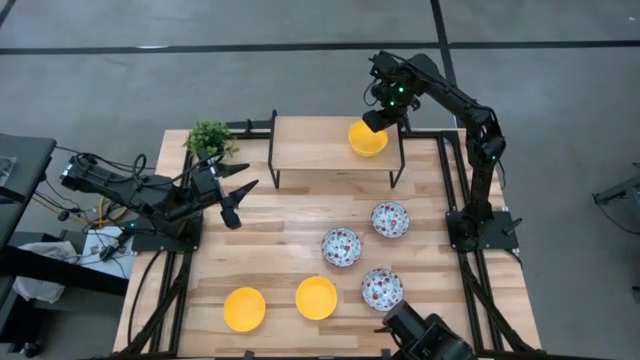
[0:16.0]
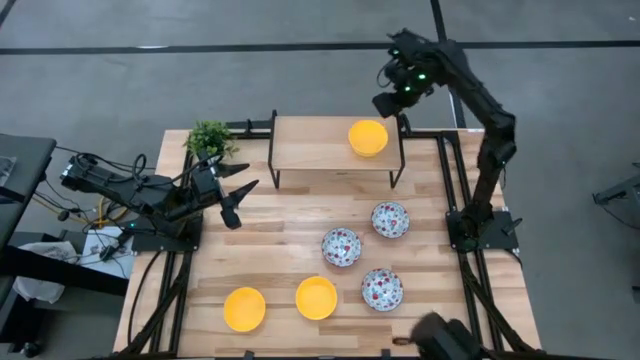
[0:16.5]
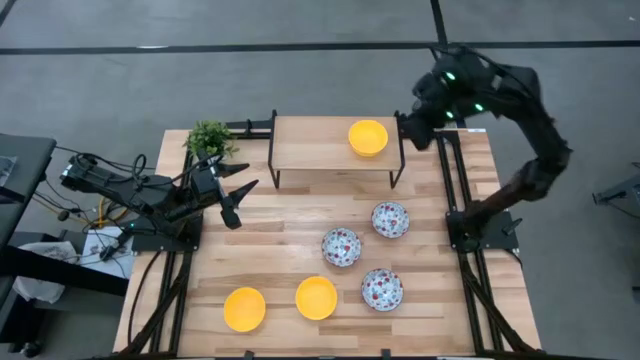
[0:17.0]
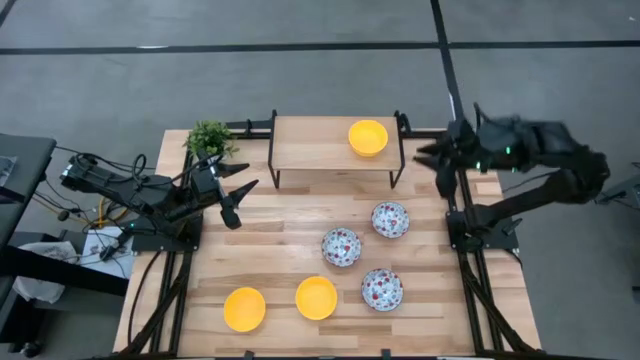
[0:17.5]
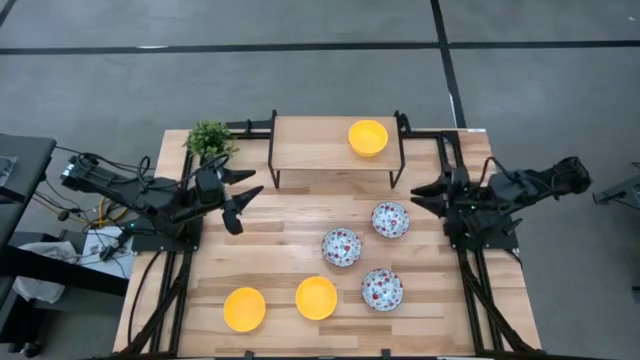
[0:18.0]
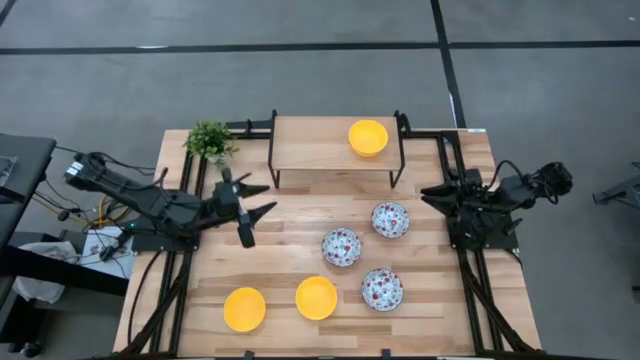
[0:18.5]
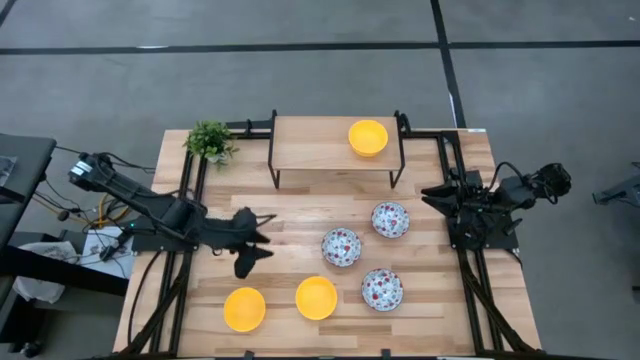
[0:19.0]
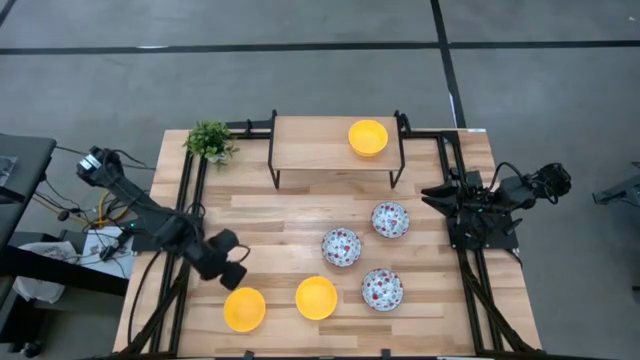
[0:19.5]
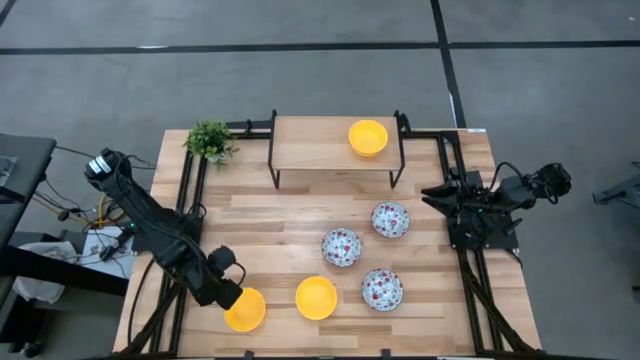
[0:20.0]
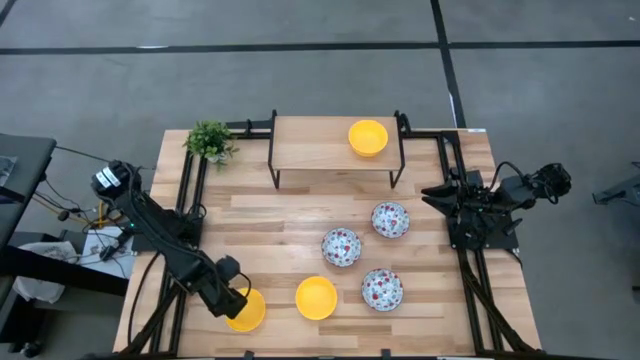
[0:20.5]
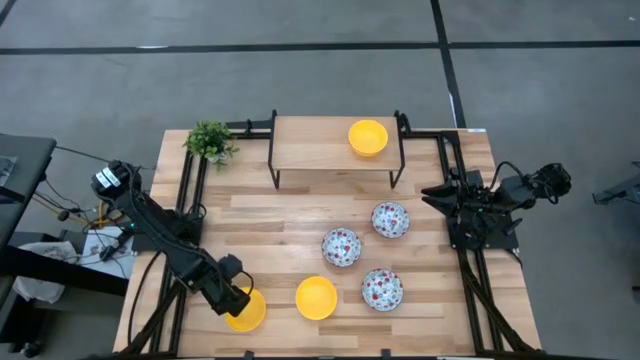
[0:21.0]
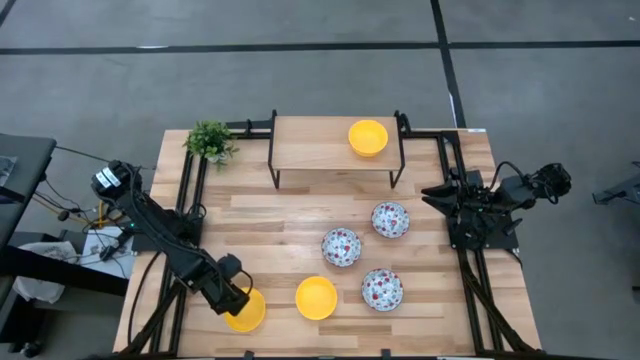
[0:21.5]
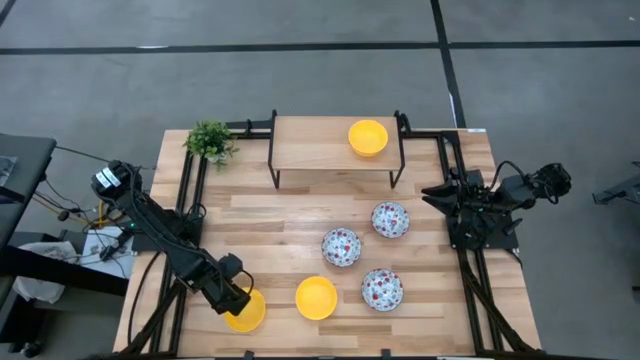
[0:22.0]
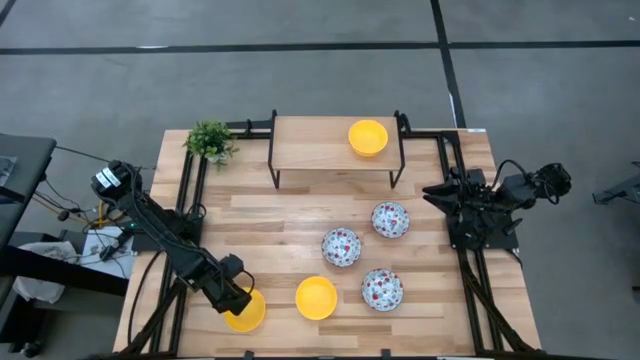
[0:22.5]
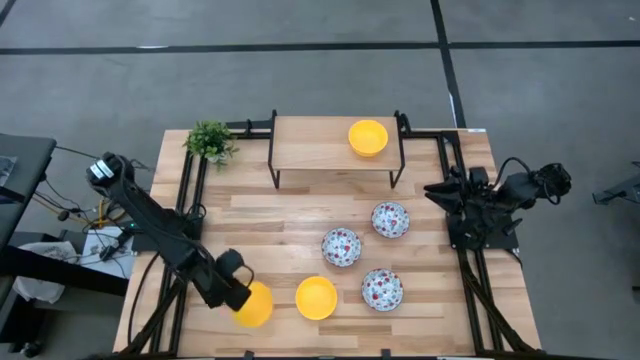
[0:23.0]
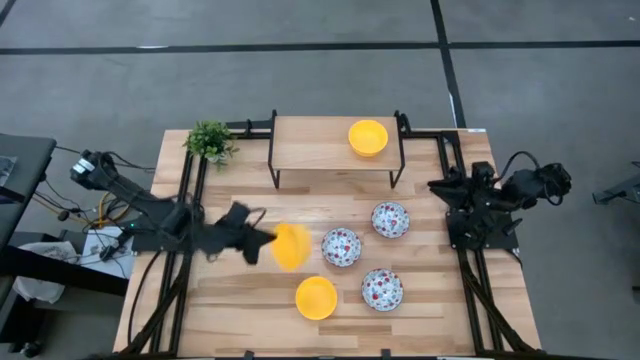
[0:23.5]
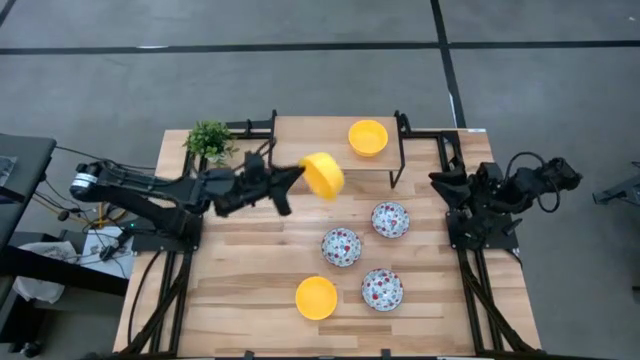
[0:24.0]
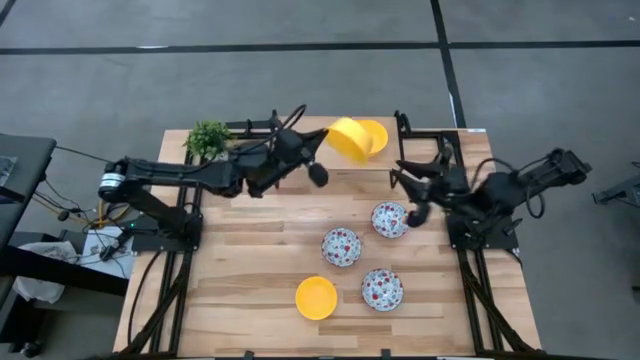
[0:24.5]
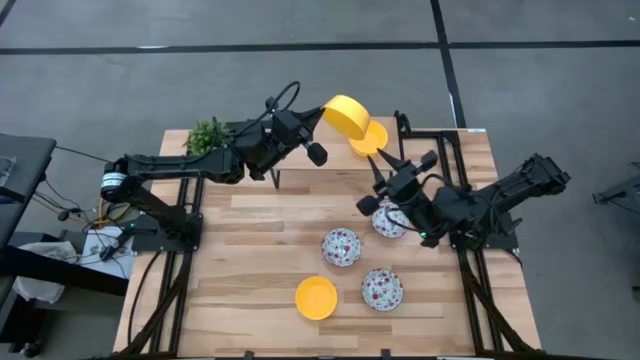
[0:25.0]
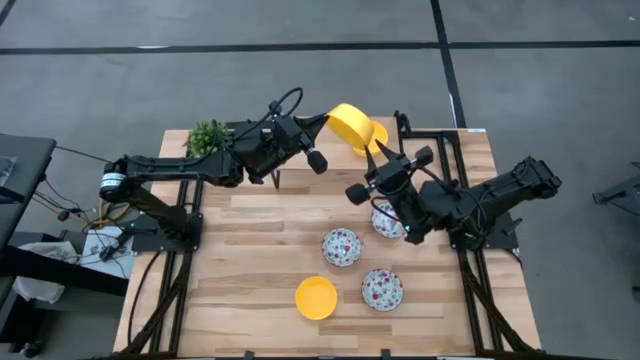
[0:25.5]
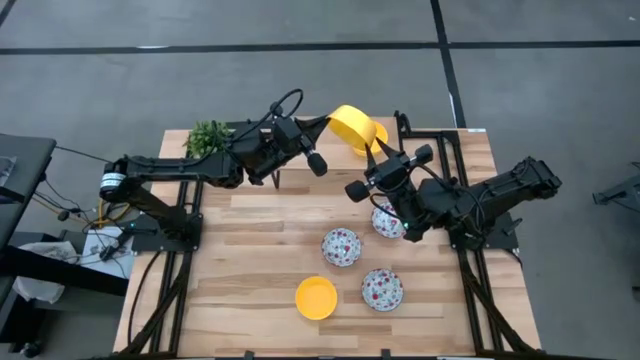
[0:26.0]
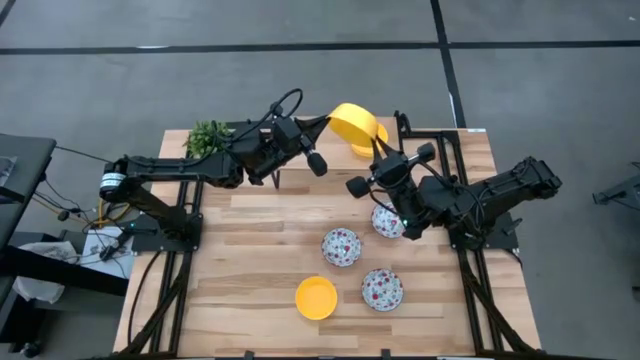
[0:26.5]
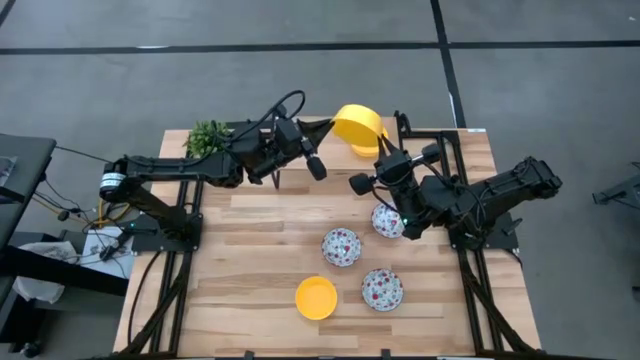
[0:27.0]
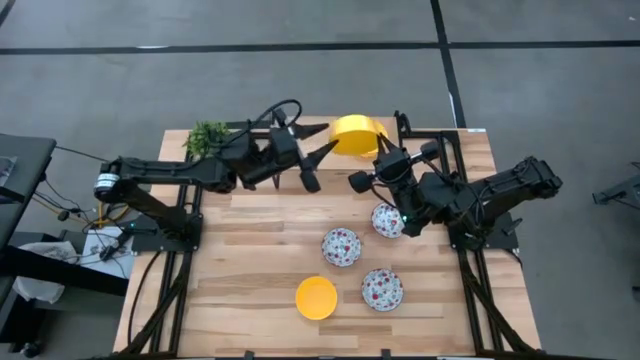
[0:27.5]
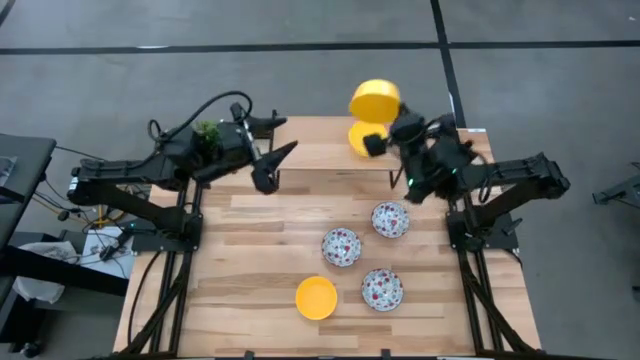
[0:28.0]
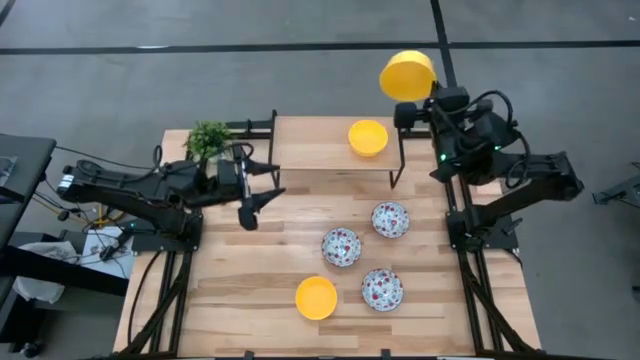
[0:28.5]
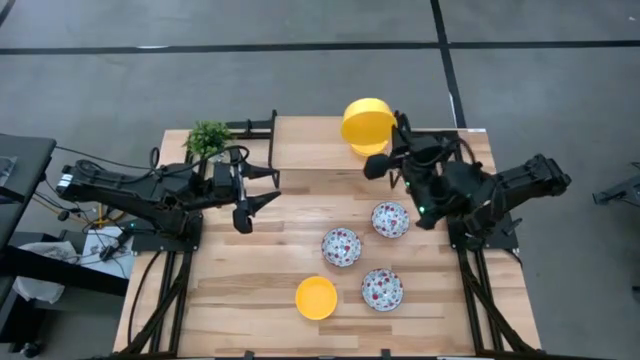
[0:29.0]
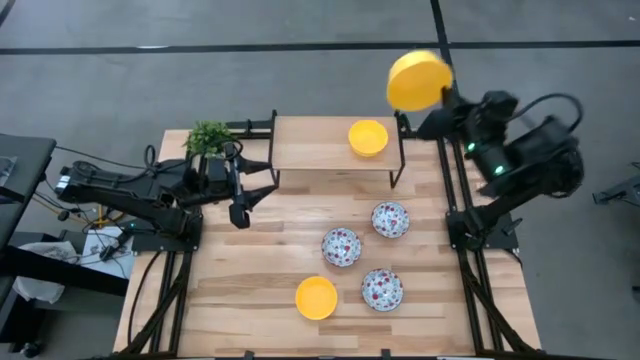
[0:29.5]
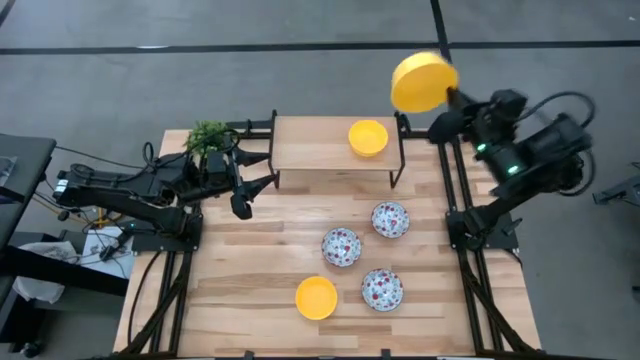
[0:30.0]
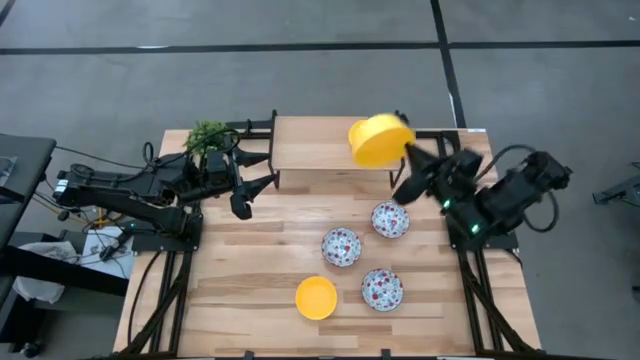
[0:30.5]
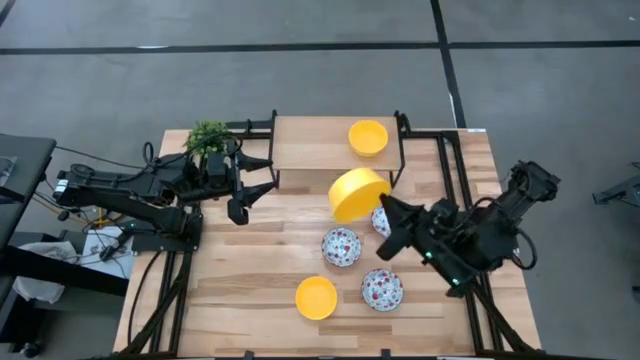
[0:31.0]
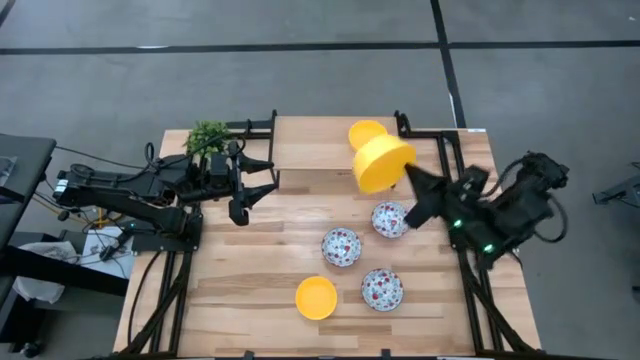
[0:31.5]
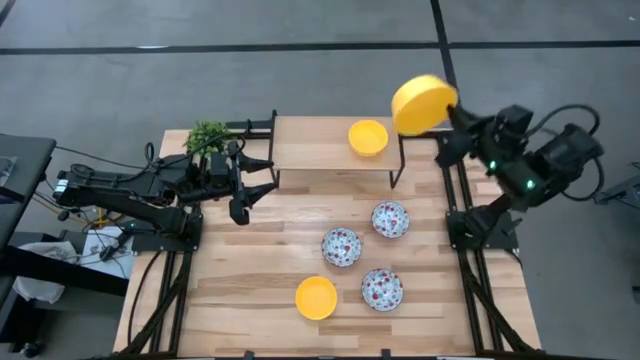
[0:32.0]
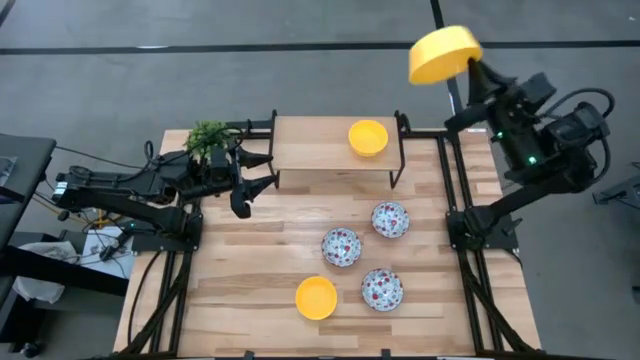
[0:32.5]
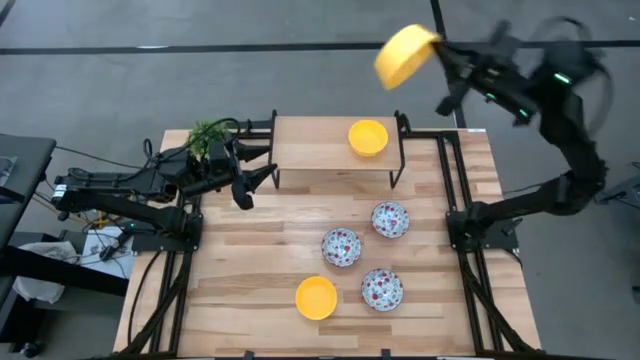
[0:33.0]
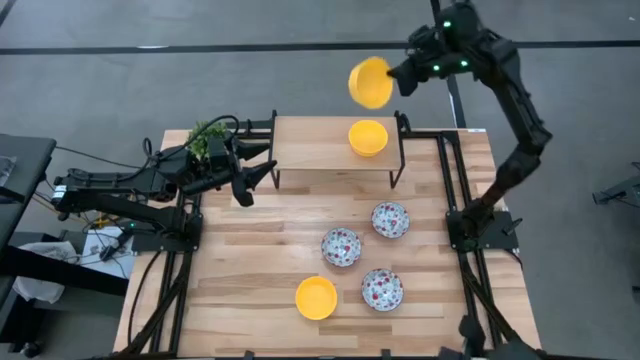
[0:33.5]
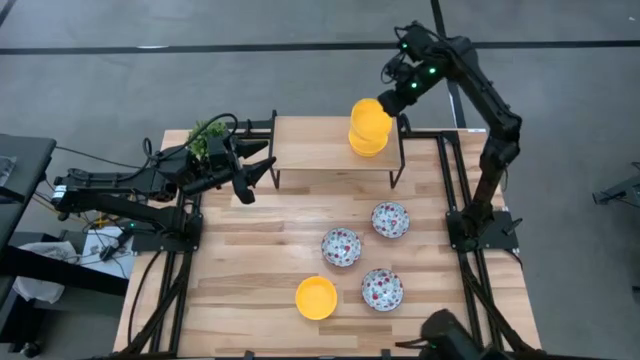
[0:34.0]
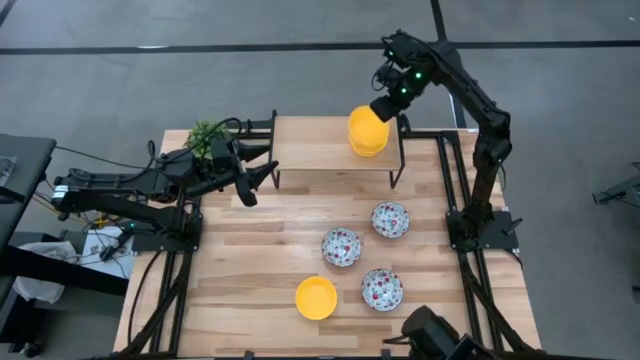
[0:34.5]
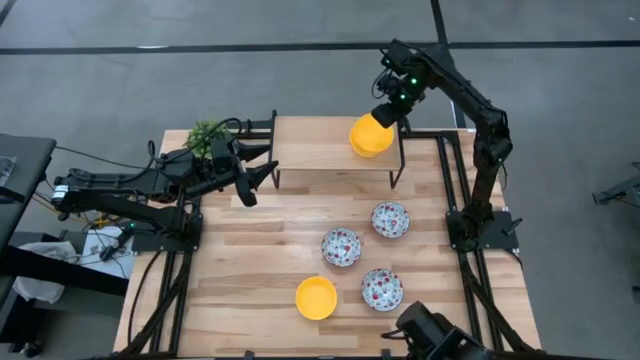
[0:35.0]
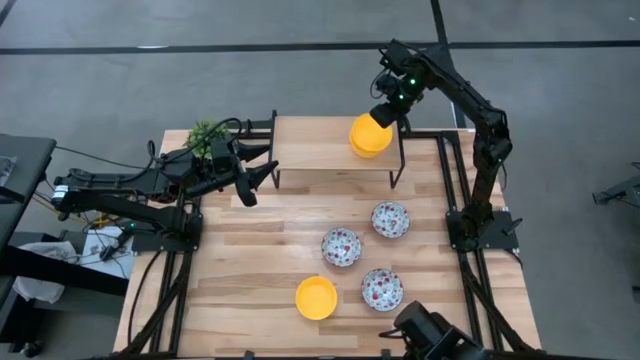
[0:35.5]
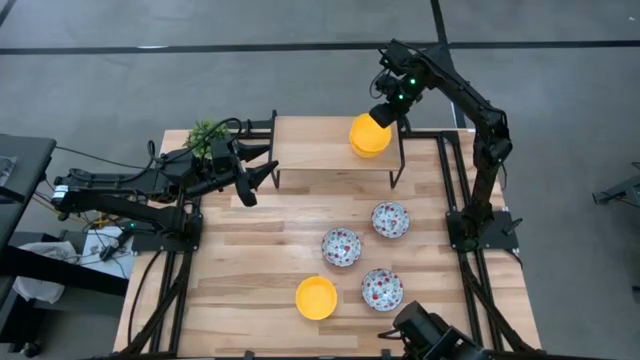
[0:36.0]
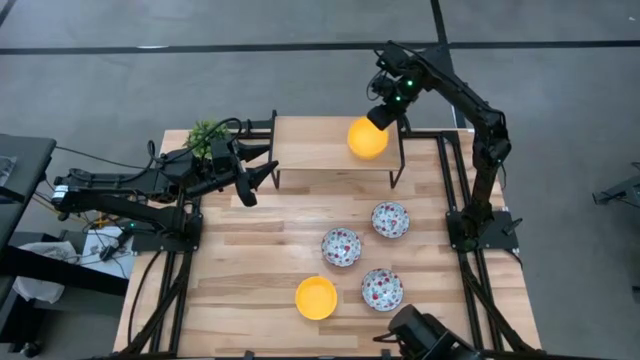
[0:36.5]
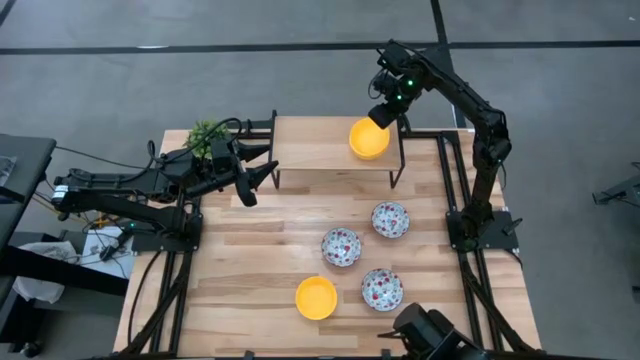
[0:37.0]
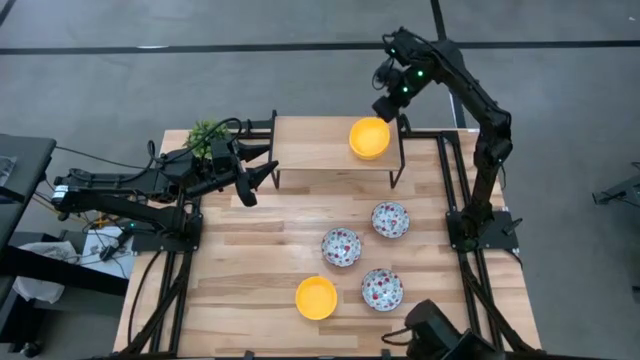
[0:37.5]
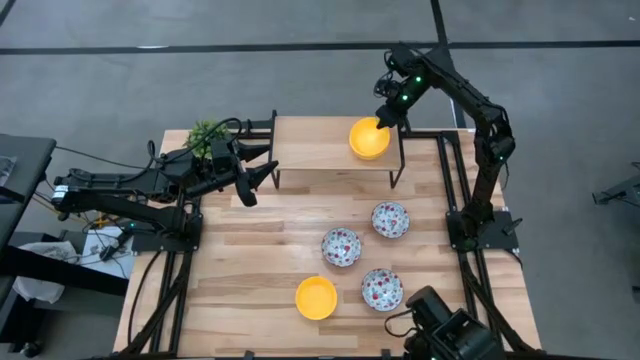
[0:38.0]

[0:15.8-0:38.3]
Task: Pick & Place Mini bowls
Stack the left yellow bowl on the yellow bowl on the shelf
